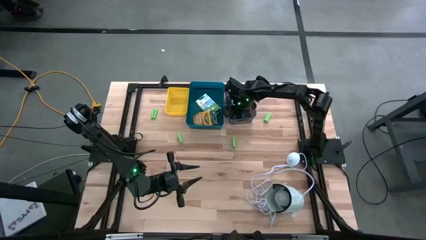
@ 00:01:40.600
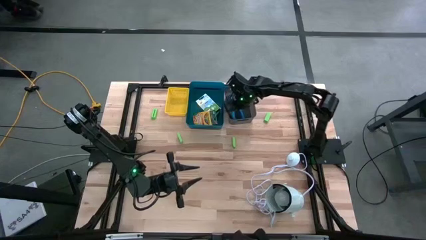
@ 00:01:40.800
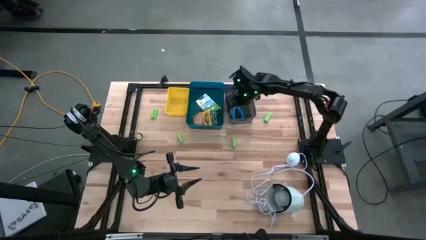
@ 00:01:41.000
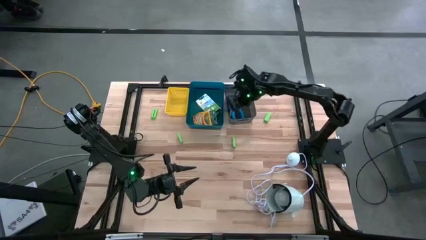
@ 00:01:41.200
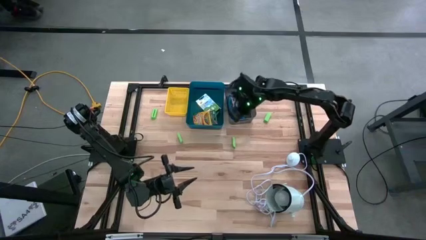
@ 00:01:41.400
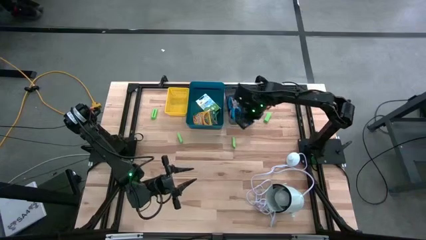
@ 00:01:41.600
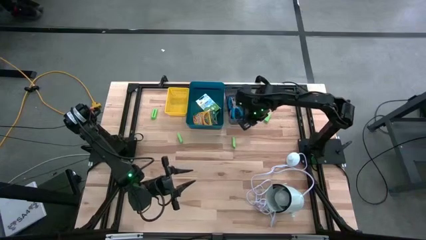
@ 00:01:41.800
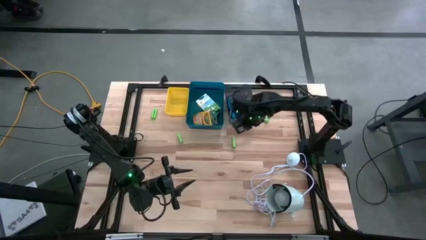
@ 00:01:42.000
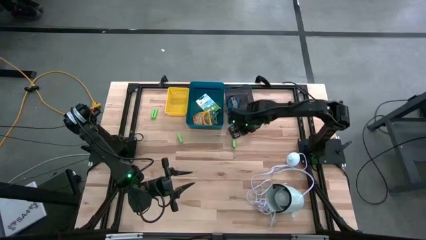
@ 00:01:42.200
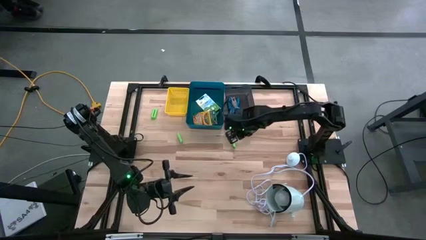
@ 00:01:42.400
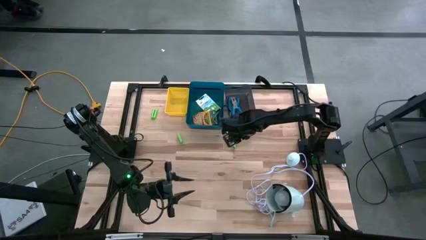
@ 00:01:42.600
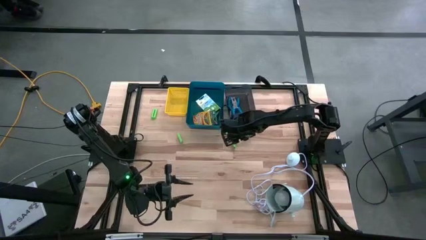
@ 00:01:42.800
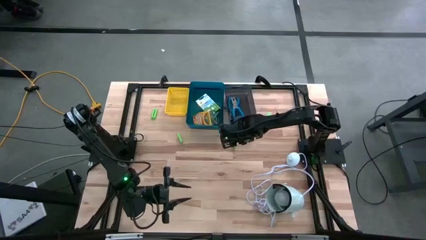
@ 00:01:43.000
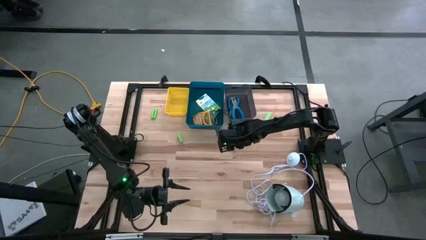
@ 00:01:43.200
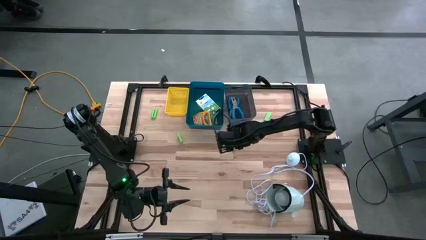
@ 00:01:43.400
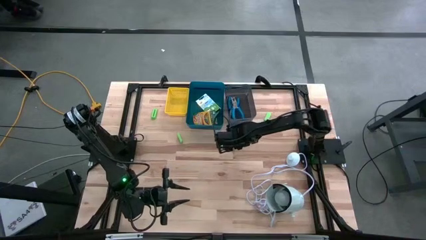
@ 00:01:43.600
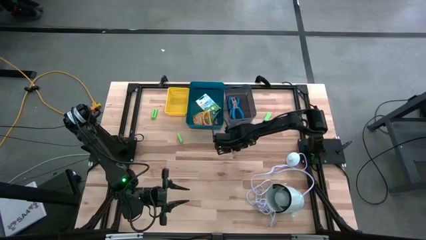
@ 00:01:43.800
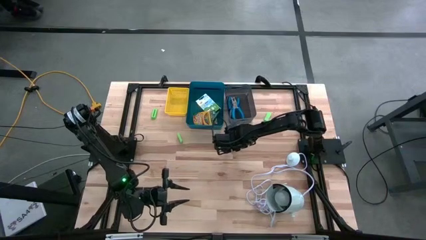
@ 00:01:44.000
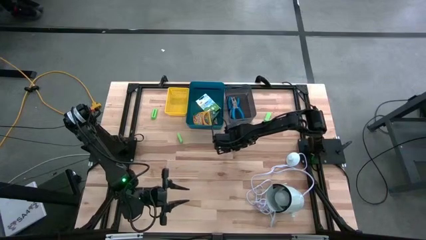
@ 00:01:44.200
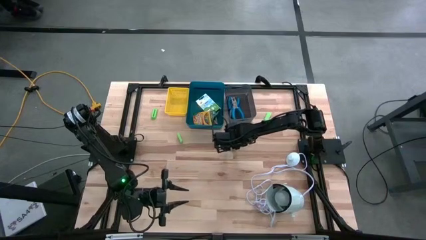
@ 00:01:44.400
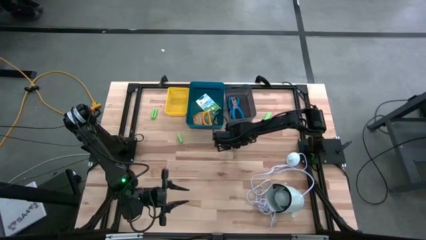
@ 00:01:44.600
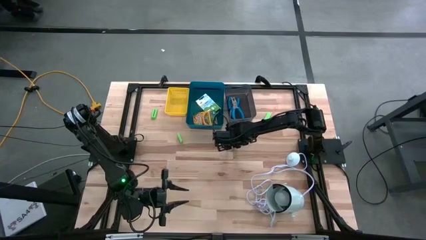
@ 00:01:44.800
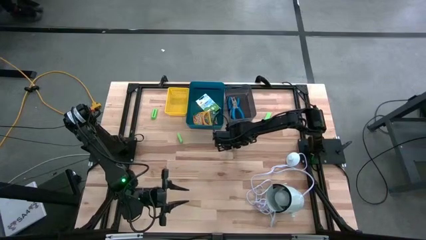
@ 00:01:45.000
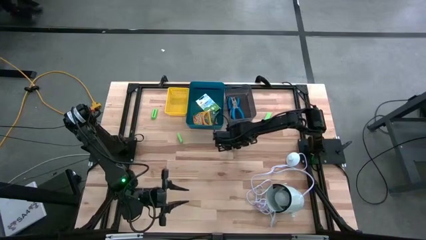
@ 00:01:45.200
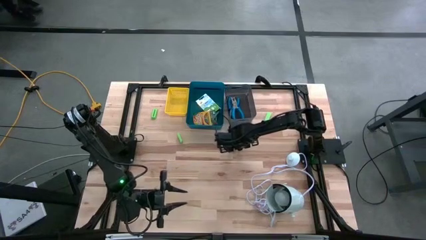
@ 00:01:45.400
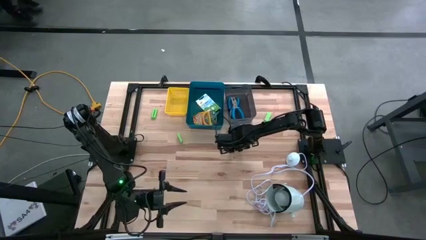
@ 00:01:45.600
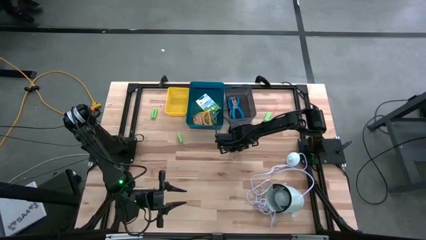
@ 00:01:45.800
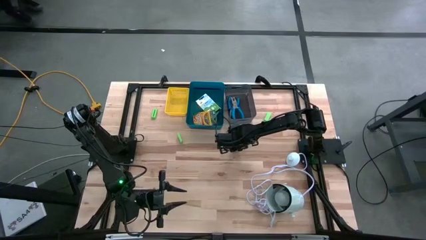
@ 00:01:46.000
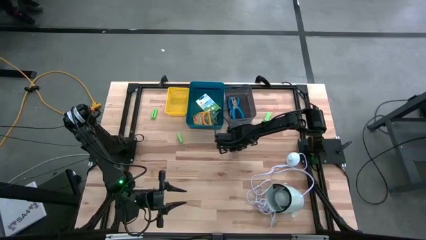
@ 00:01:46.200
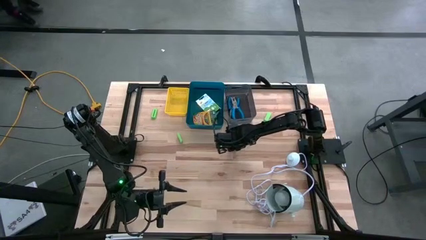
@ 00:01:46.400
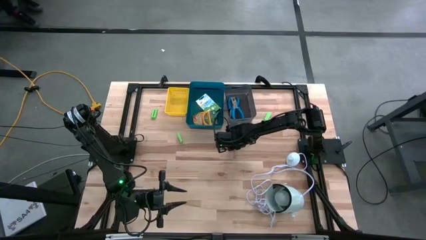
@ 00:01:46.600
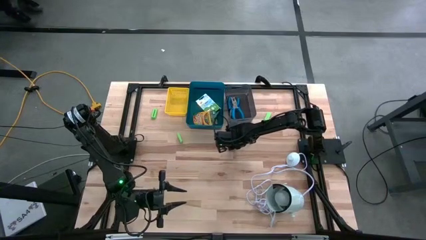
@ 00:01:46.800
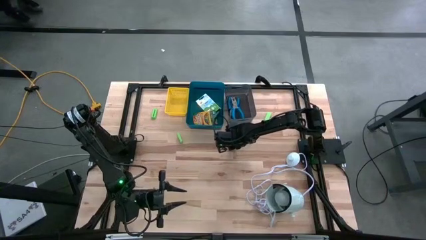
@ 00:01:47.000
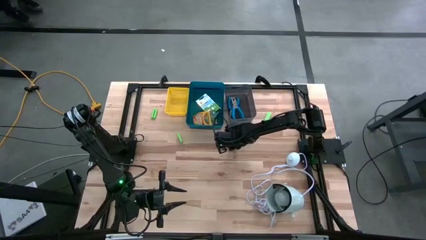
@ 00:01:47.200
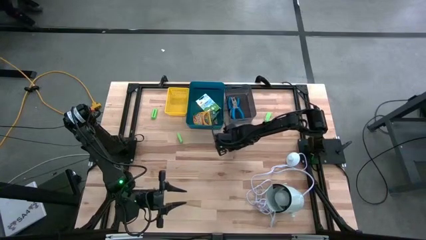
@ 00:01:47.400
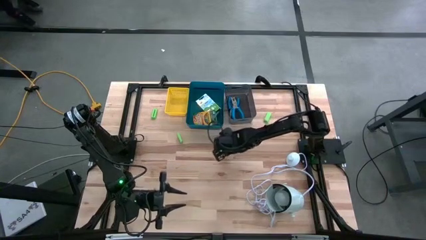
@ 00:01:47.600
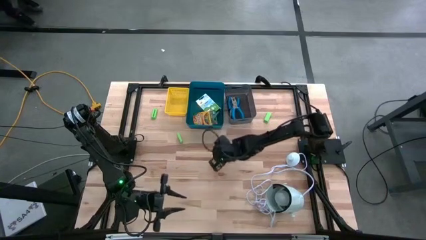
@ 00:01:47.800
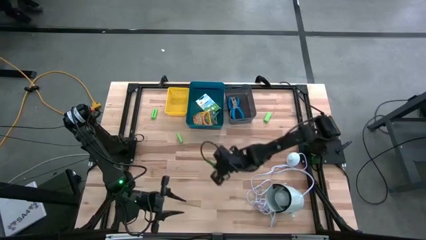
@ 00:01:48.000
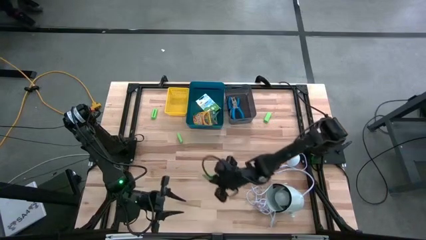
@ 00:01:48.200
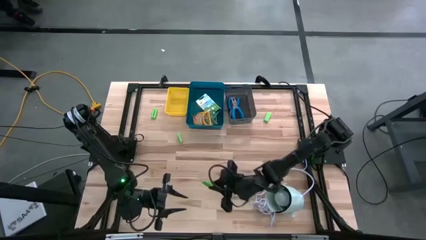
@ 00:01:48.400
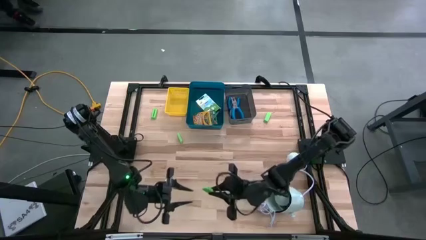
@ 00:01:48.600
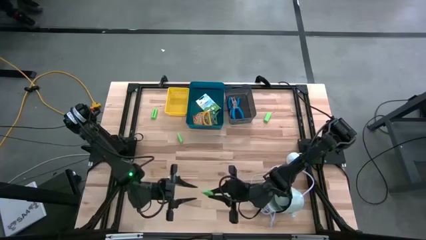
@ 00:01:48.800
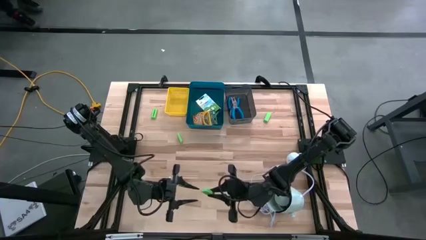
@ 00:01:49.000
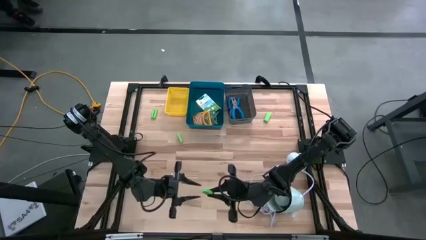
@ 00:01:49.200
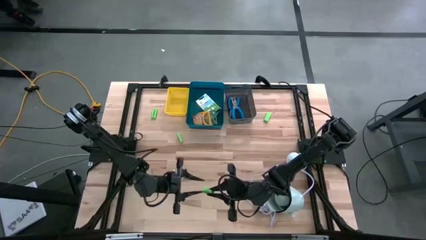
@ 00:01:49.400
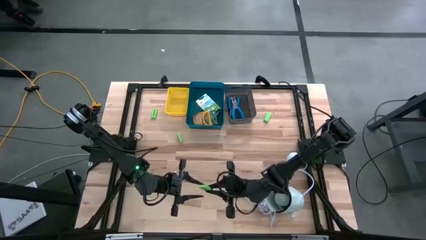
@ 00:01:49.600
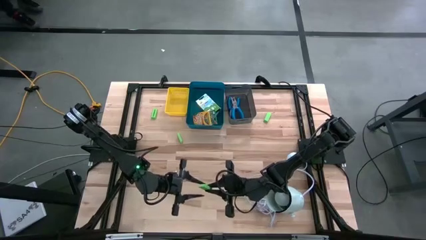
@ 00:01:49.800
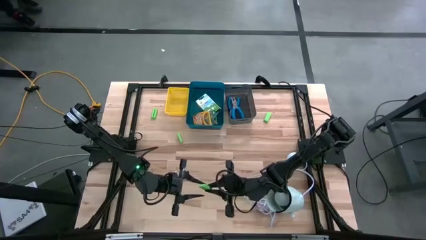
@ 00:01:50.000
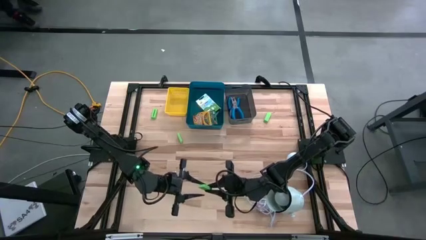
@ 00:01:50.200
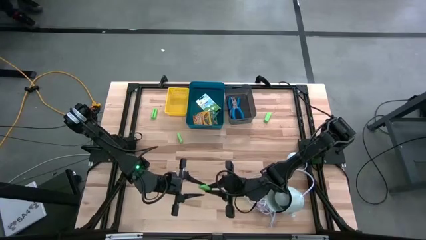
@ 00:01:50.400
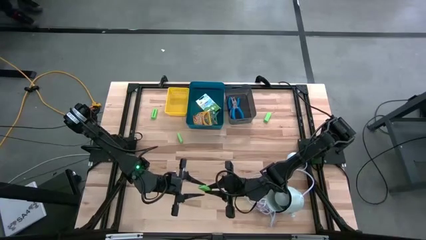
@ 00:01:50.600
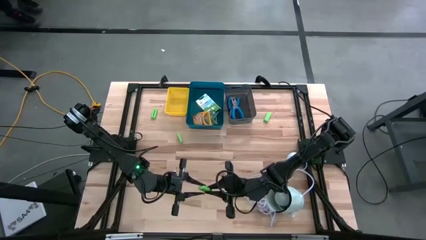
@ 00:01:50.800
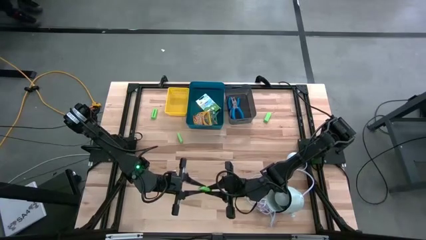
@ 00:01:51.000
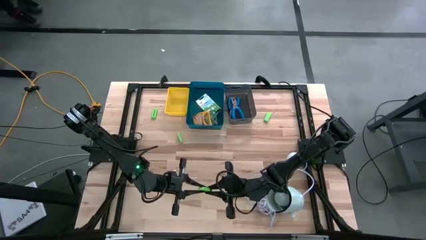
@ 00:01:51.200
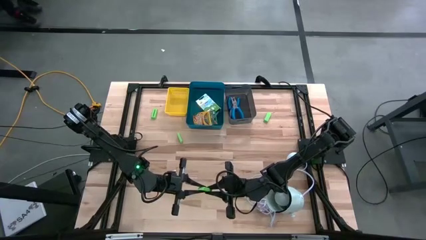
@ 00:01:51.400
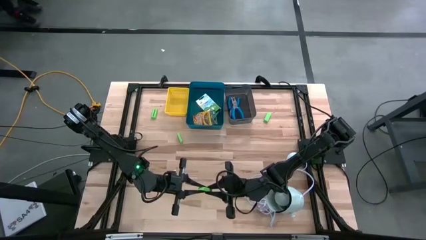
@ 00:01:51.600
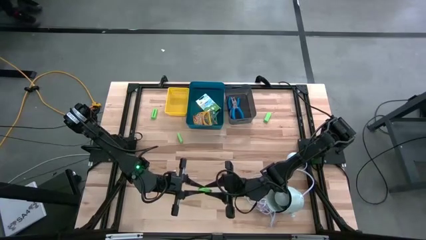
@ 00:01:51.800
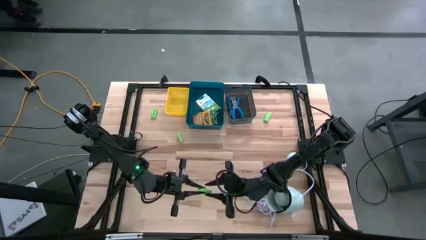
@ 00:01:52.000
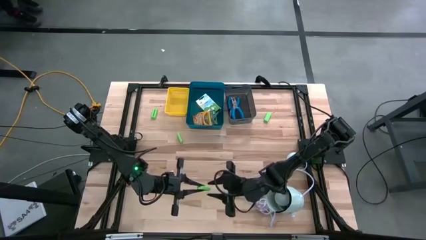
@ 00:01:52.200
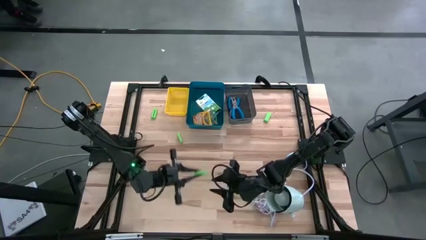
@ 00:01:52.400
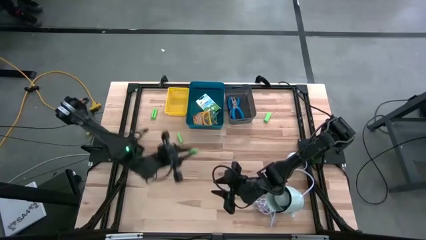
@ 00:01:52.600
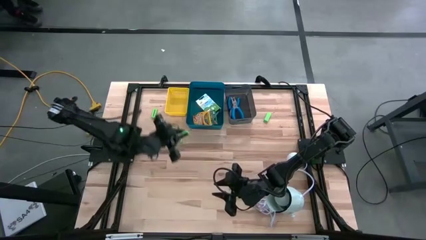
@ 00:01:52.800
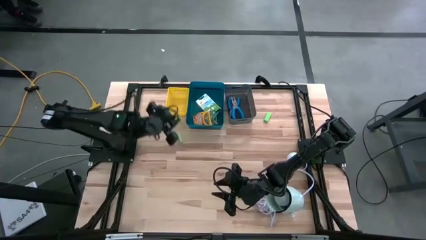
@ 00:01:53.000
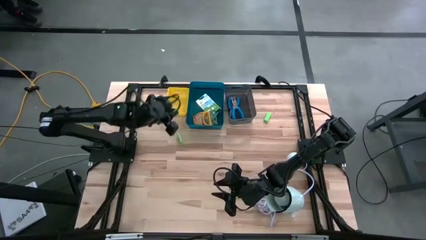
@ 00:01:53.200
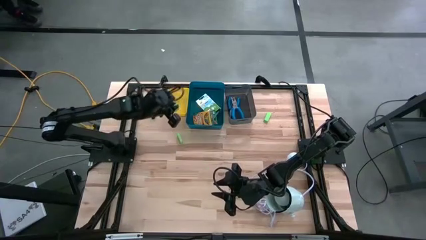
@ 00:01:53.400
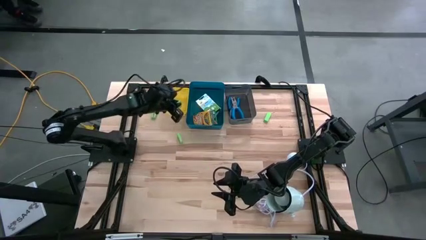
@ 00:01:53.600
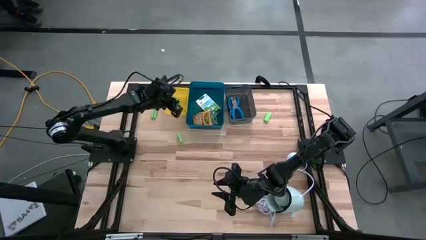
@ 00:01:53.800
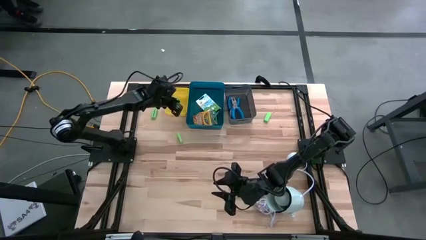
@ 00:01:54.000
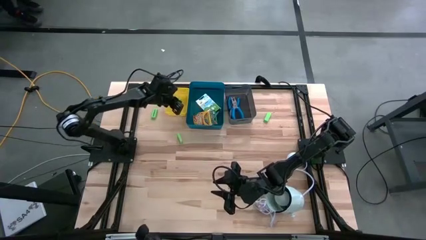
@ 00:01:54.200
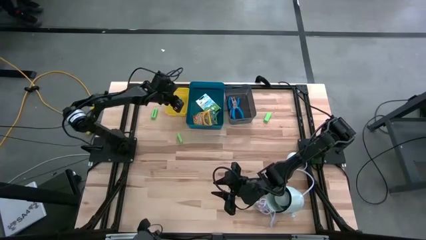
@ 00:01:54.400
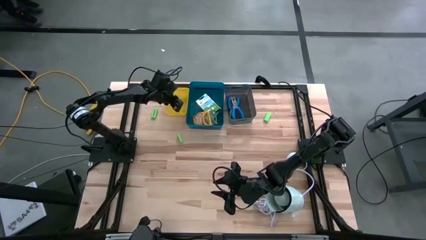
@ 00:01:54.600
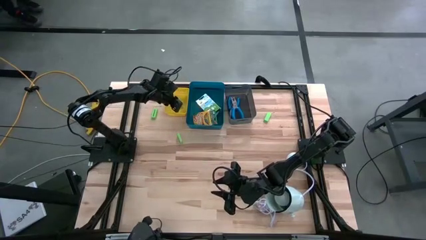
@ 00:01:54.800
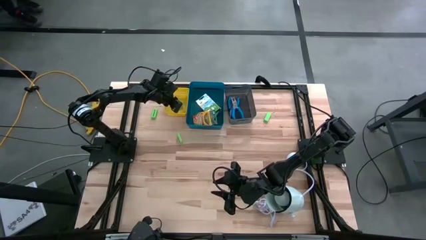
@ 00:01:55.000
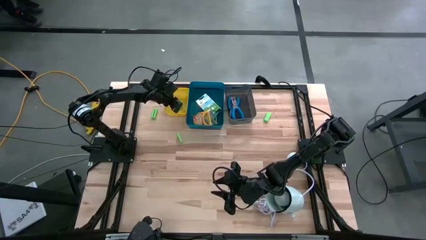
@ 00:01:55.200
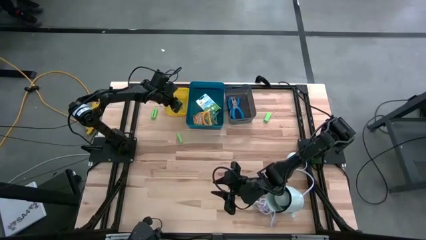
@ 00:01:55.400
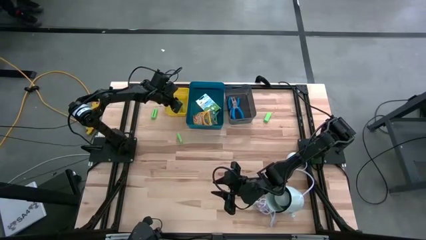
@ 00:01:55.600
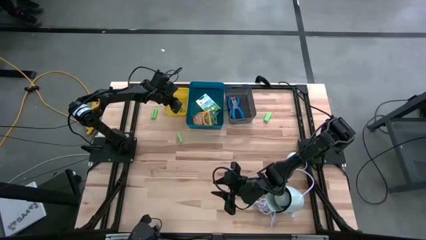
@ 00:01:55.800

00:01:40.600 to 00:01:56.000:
Task: Pick & Place School Supplies
Put the green eraser into the yellow bin
